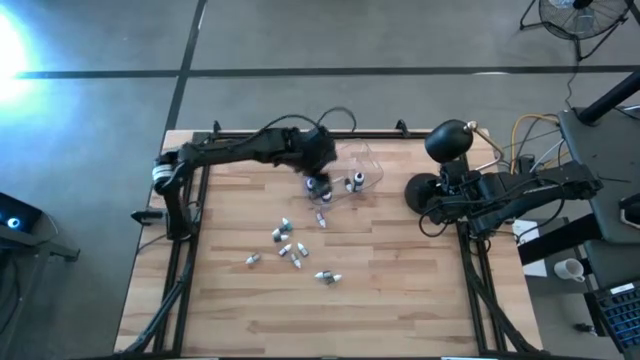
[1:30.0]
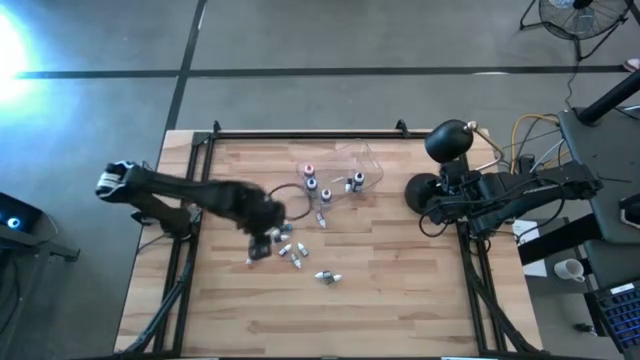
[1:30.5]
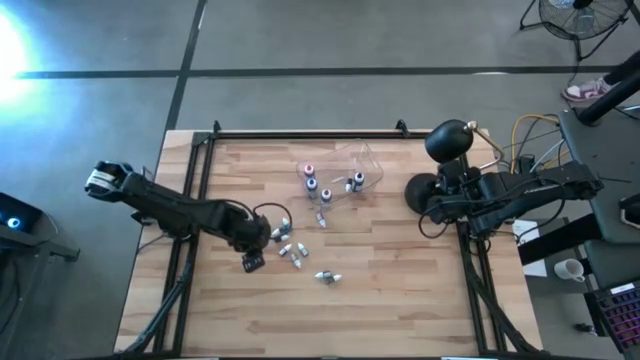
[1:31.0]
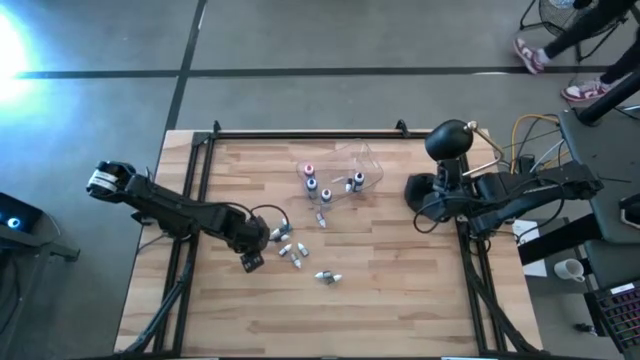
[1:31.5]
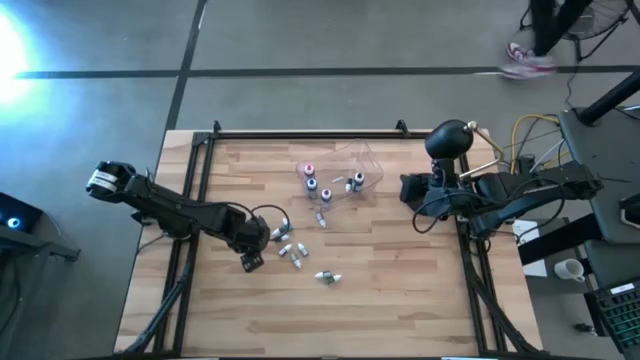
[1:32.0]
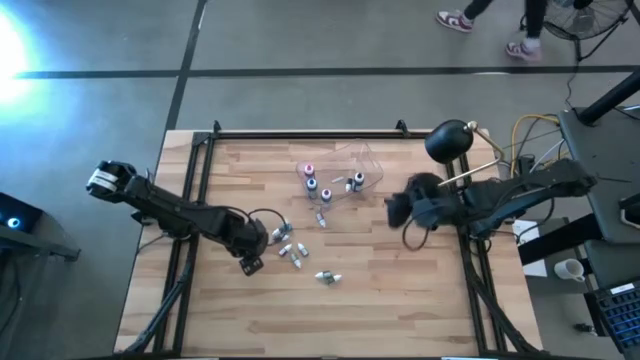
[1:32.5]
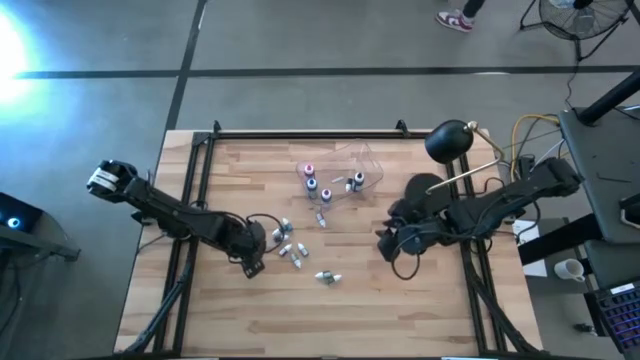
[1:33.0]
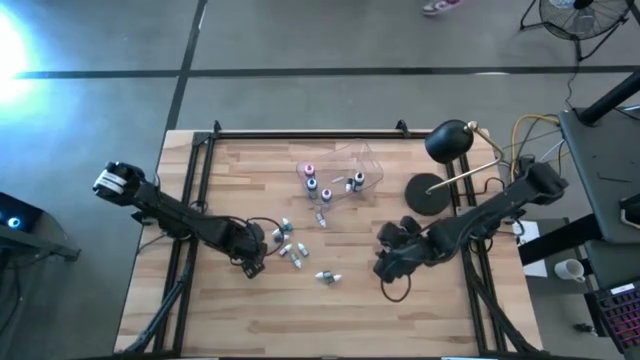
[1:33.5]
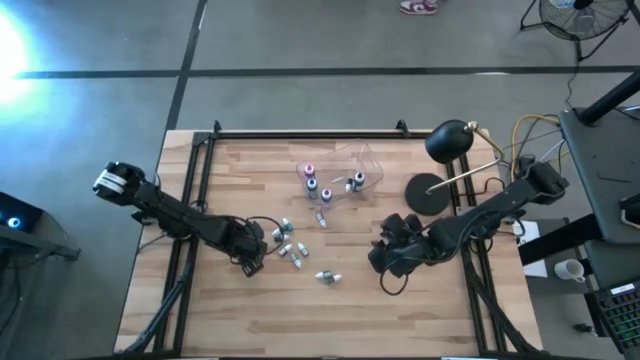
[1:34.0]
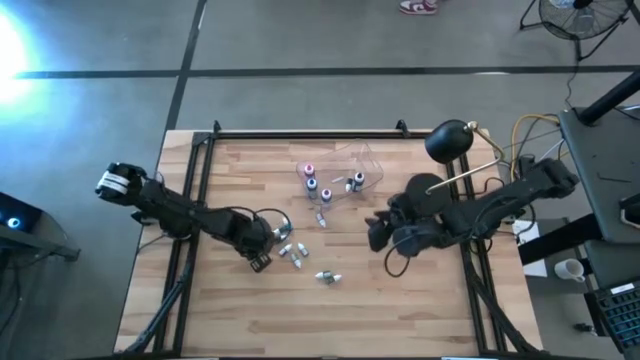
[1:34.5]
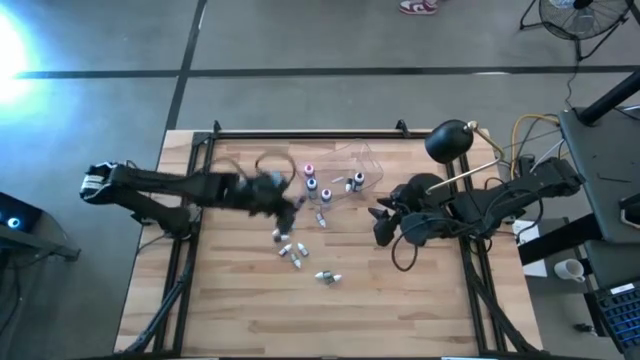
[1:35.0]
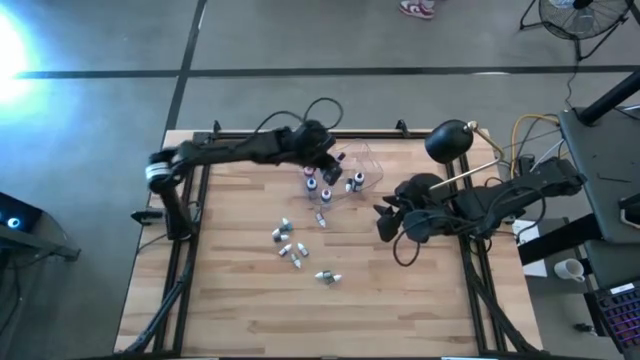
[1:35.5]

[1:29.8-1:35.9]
Task: Pick & Place food coloring
Put the top small purple food coloring bottle into the transparent bin

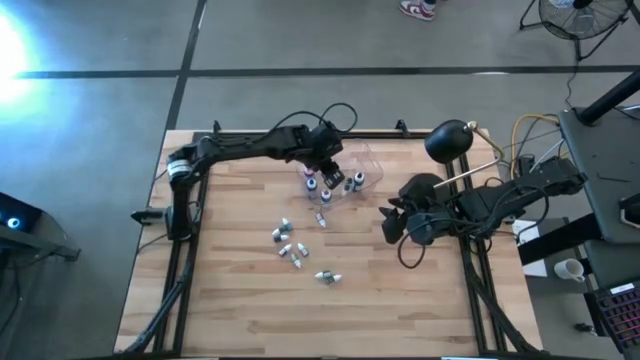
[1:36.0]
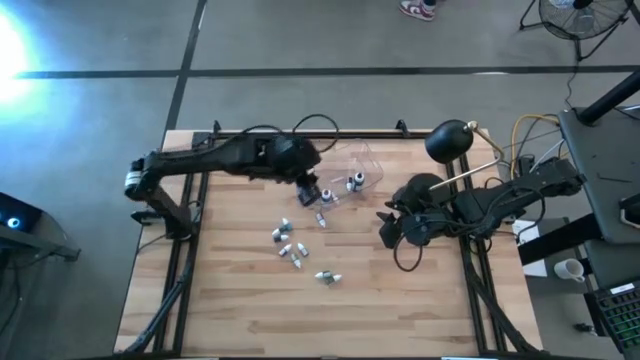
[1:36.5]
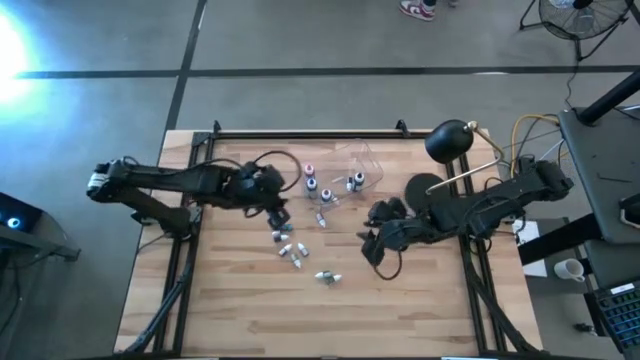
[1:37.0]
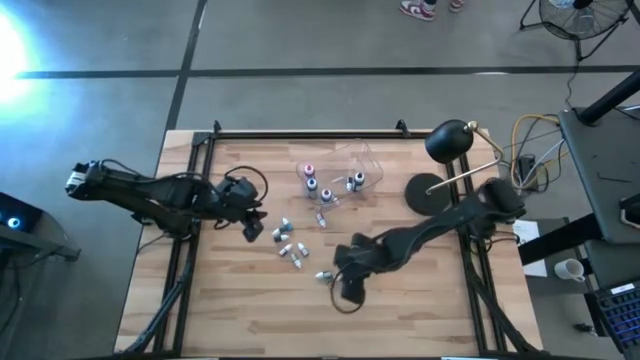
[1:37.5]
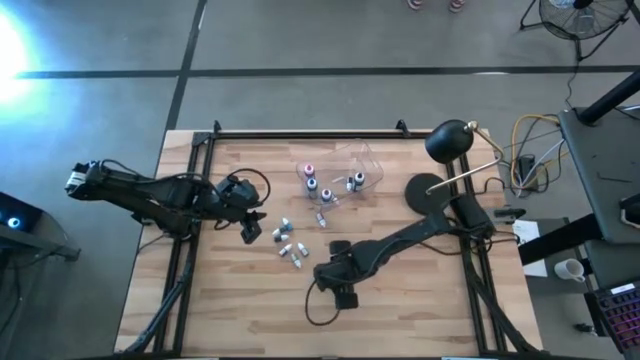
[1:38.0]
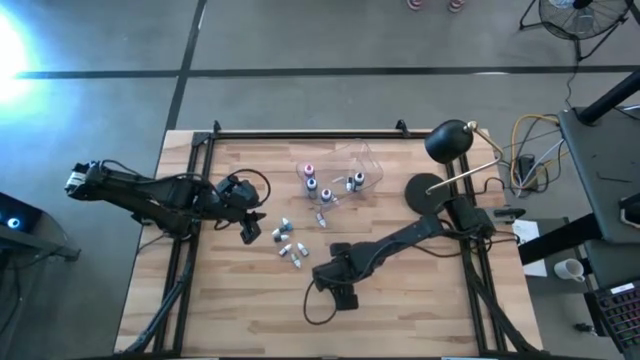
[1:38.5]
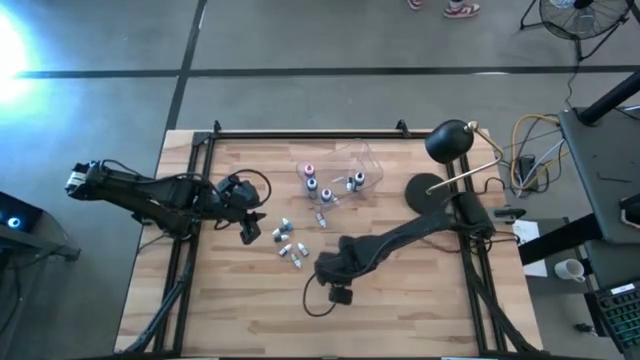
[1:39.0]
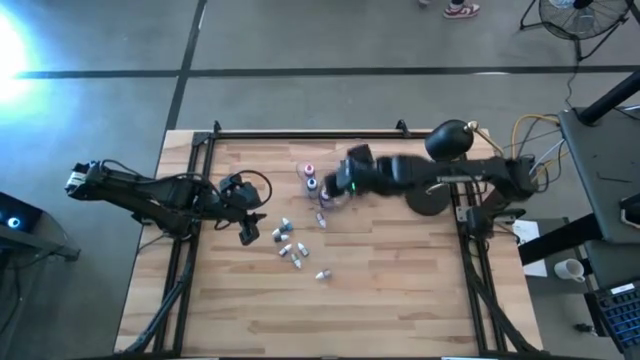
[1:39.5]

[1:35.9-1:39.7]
Put the small dark green food coloring bottle into the transparent bin

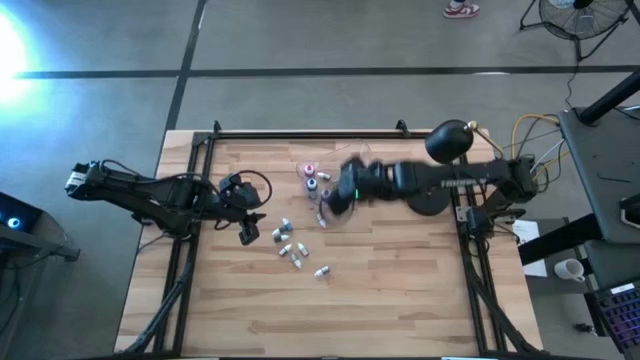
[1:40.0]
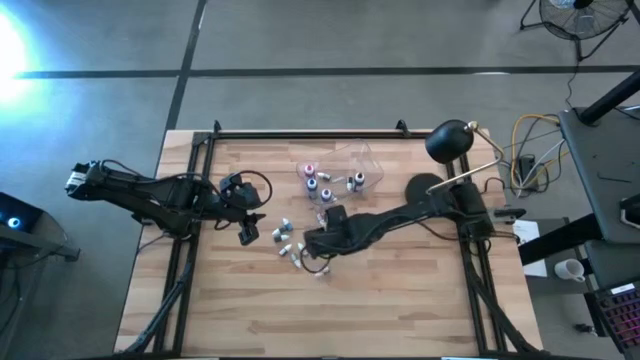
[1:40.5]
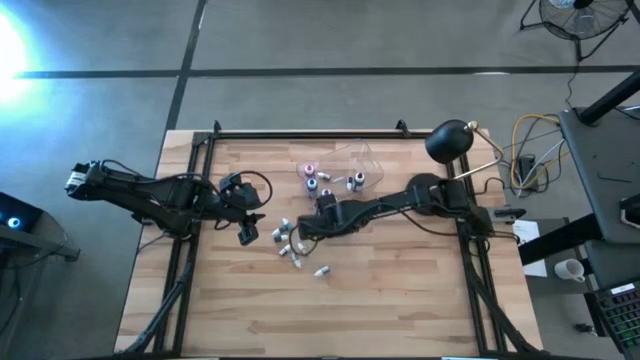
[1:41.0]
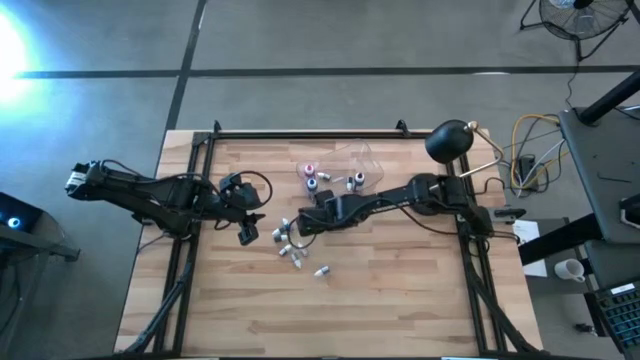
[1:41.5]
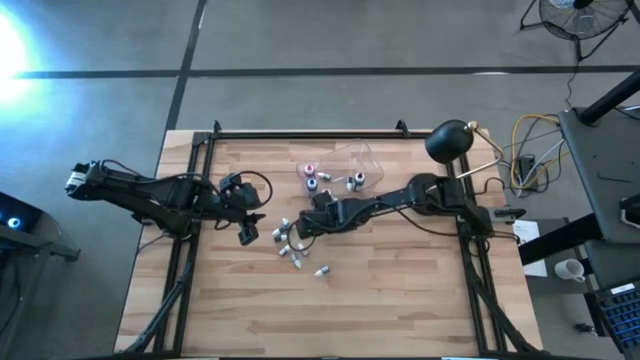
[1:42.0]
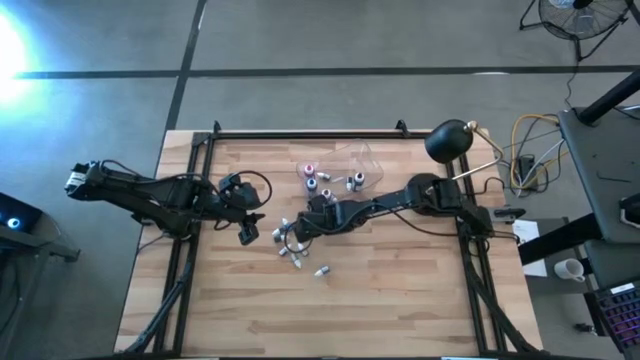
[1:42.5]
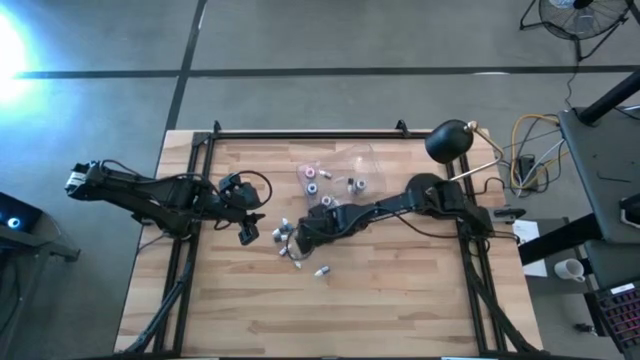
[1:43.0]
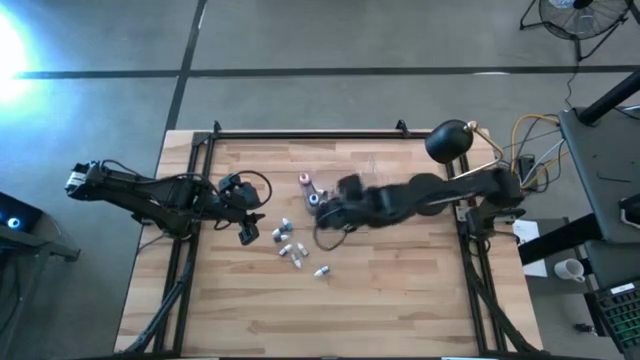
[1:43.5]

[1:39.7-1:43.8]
Put the top small red food coloring bottle into the transparent bin

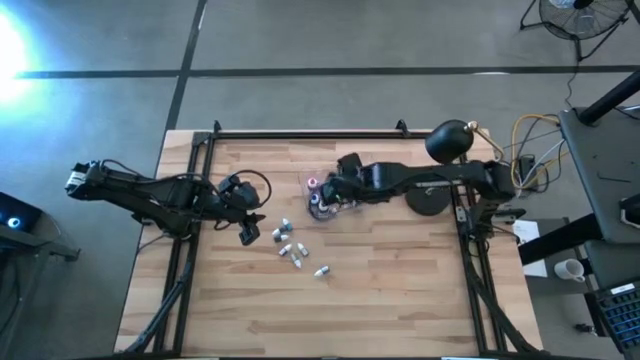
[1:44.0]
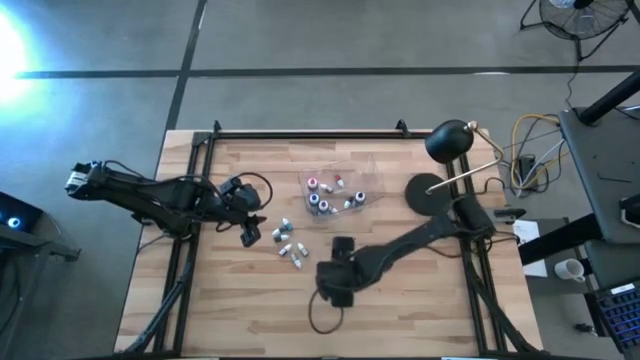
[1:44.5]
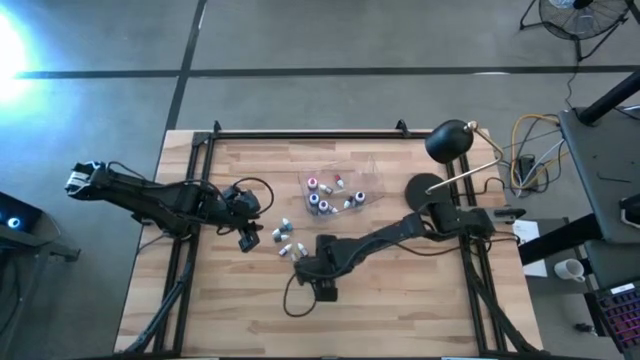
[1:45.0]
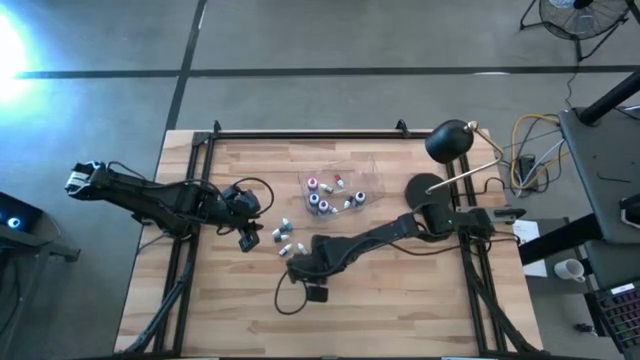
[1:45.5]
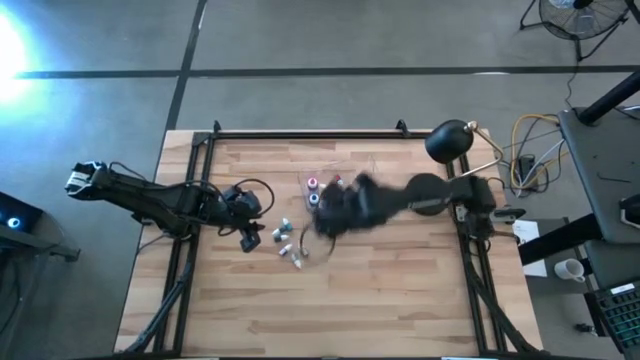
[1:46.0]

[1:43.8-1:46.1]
Put the small purple food coloring bottle into the transparent bin

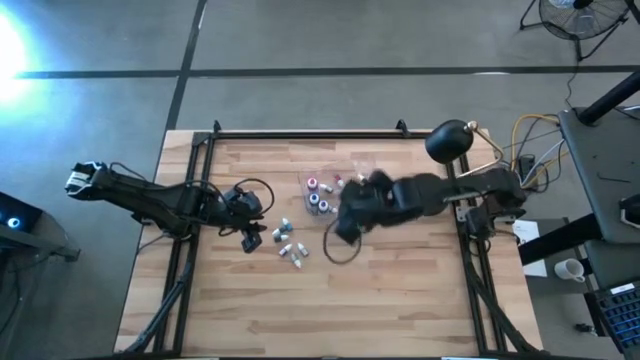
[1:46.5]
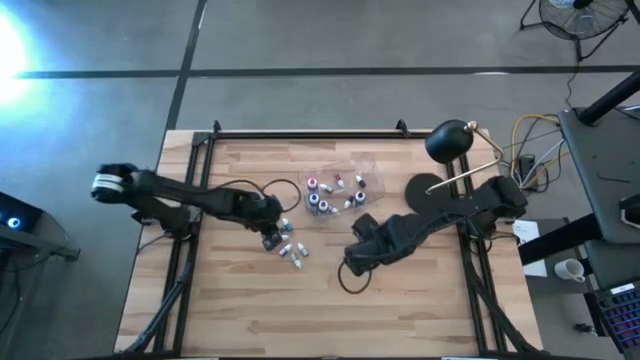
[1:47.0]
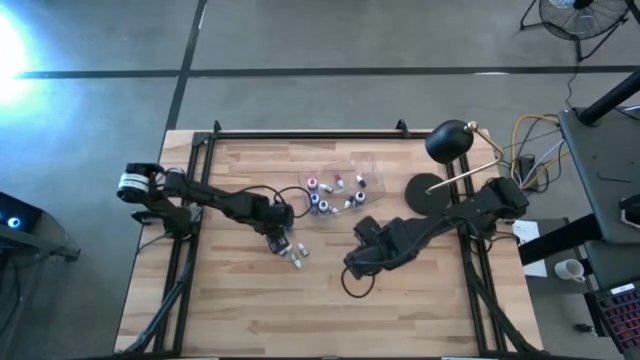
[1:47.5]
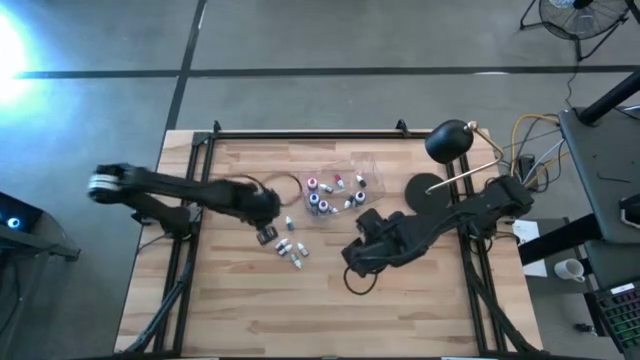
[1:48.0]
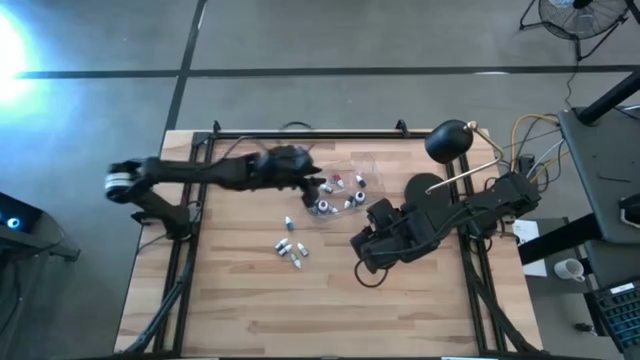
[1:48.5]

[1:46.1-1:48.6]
Put the top small black food coloring bottle into the transparent bin

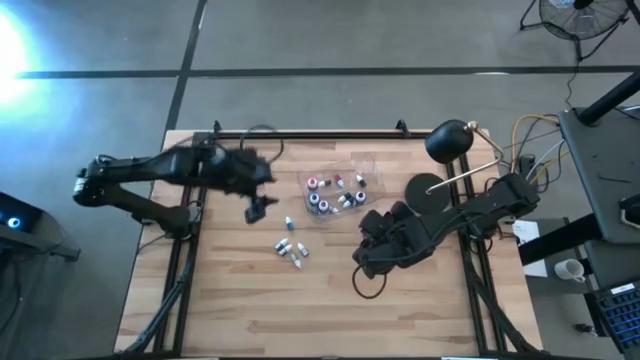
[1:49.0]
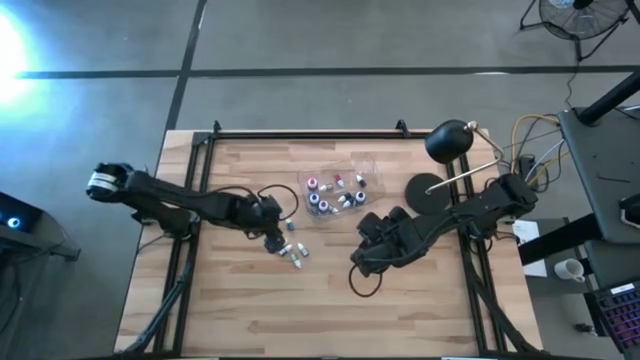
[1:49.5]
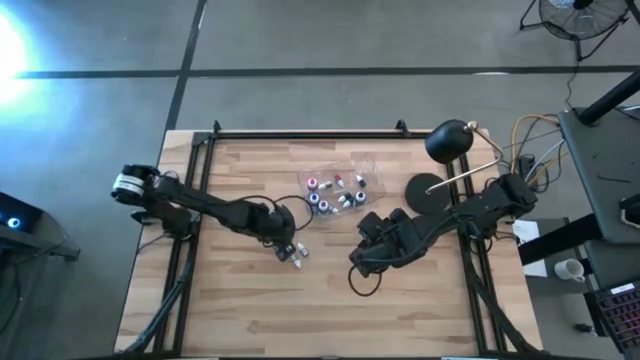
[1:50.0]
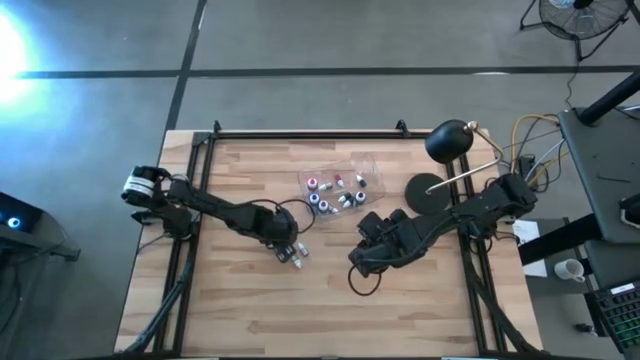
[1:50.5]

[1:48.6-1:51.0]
Put the small black food coloring bottle into the transparent bin
